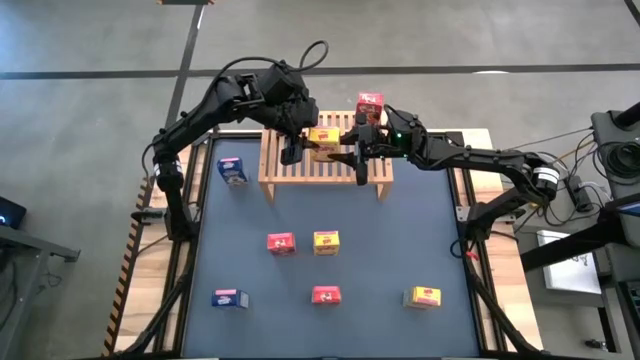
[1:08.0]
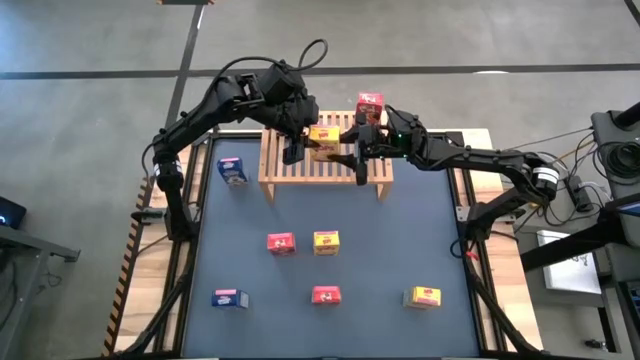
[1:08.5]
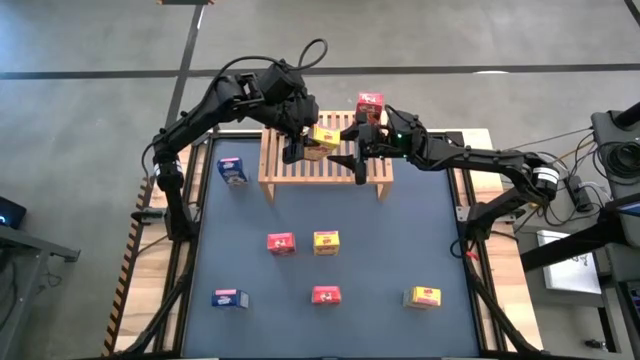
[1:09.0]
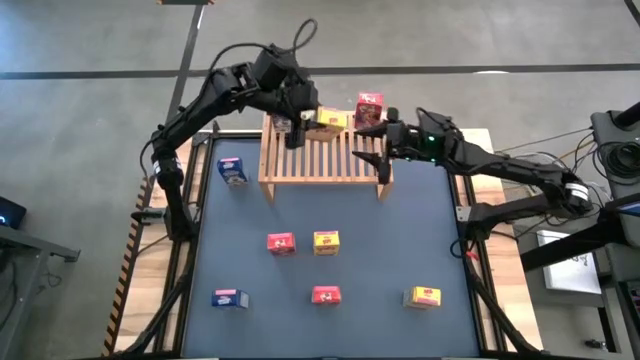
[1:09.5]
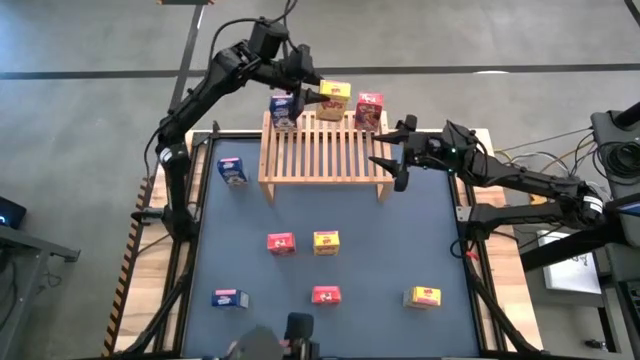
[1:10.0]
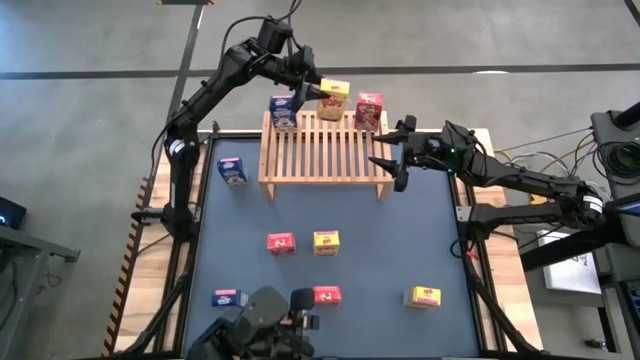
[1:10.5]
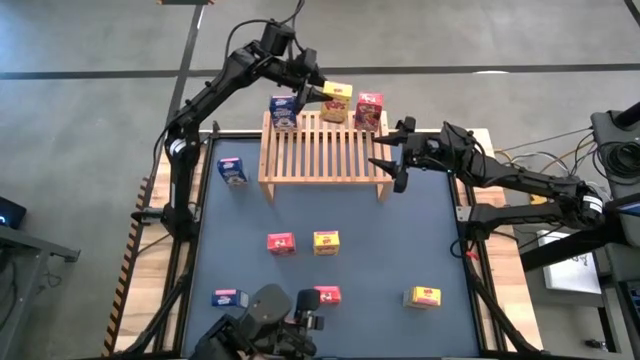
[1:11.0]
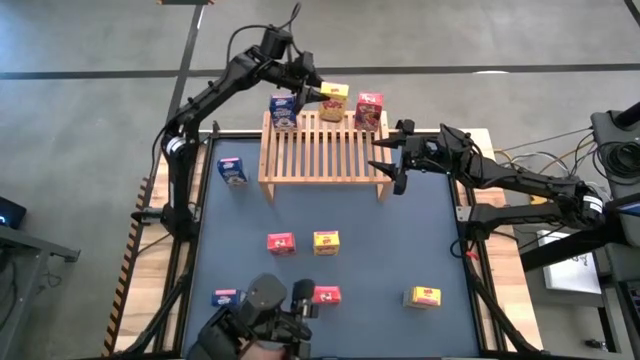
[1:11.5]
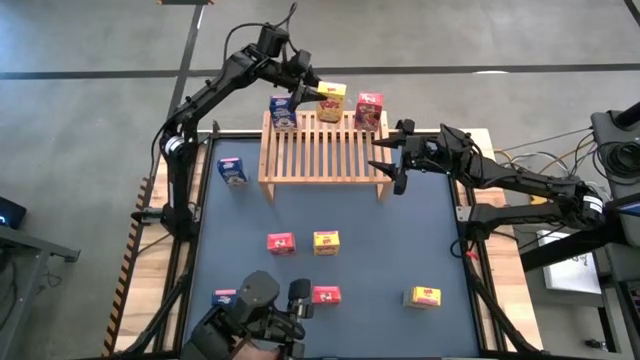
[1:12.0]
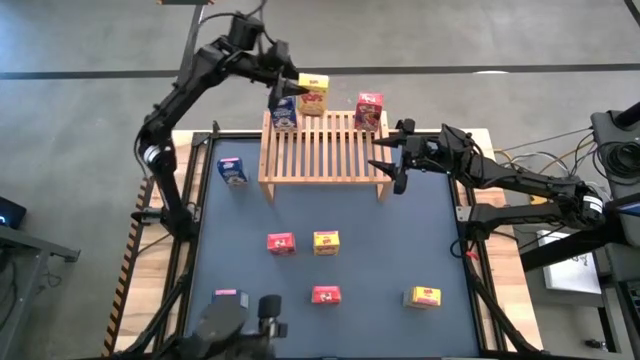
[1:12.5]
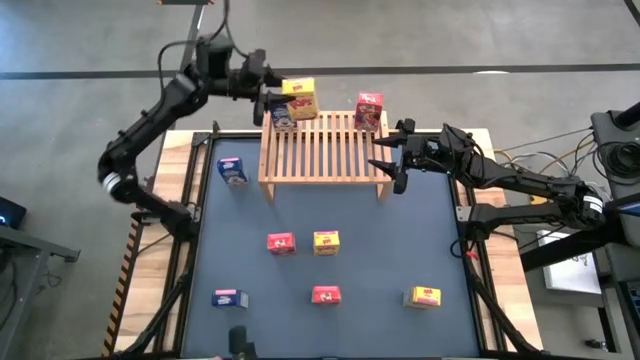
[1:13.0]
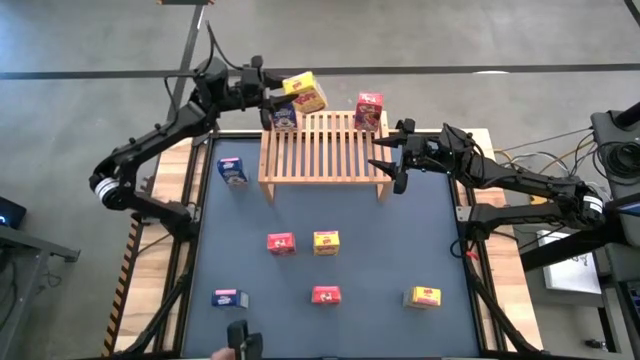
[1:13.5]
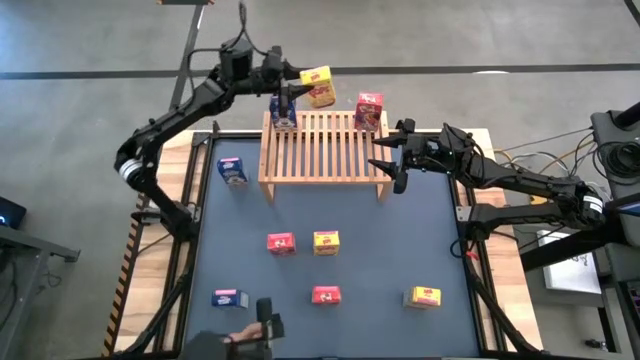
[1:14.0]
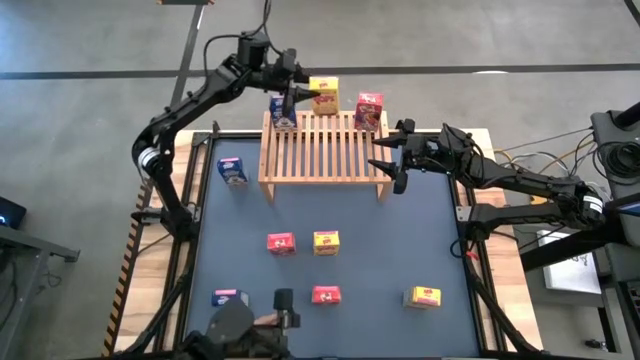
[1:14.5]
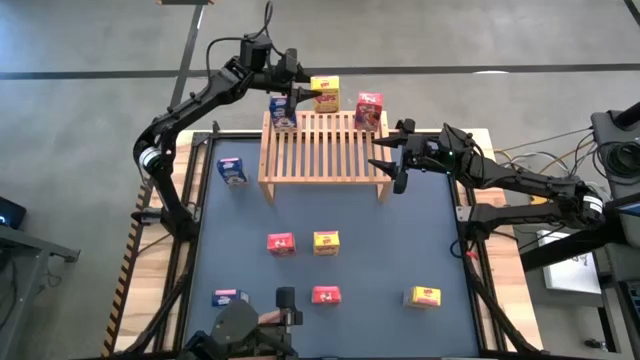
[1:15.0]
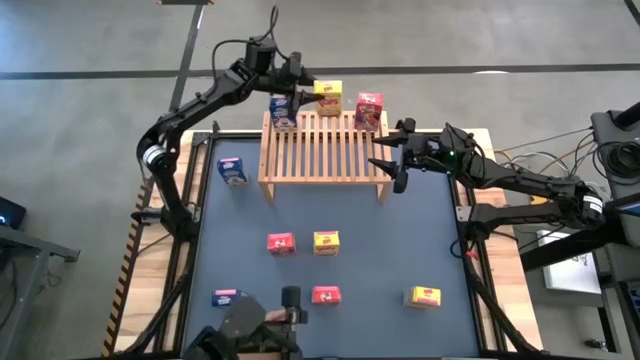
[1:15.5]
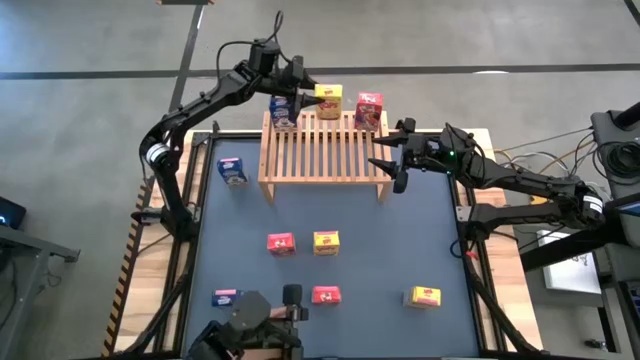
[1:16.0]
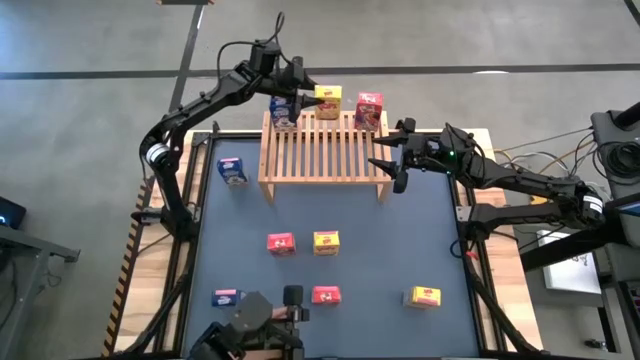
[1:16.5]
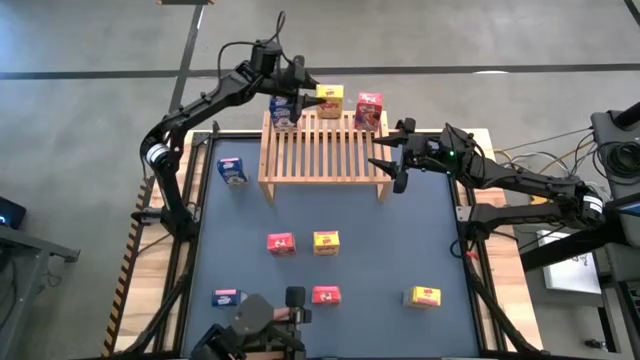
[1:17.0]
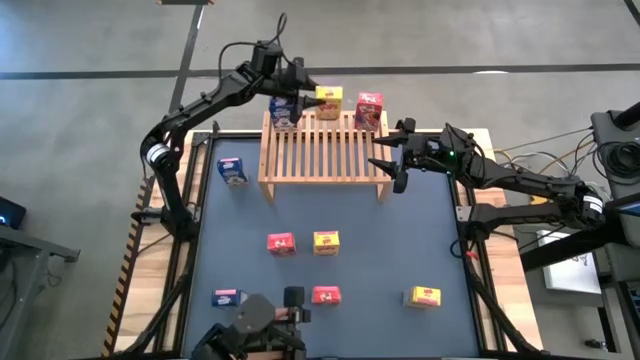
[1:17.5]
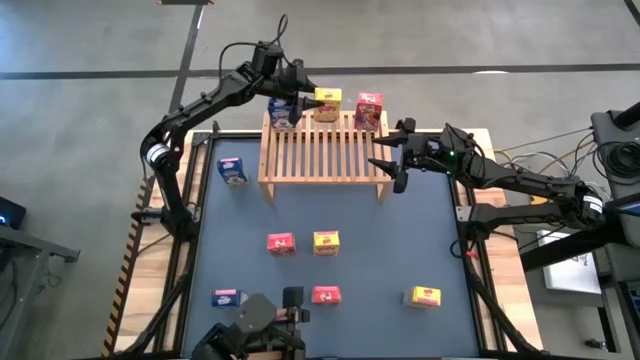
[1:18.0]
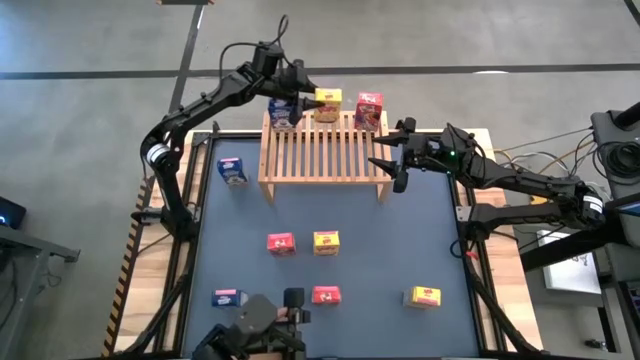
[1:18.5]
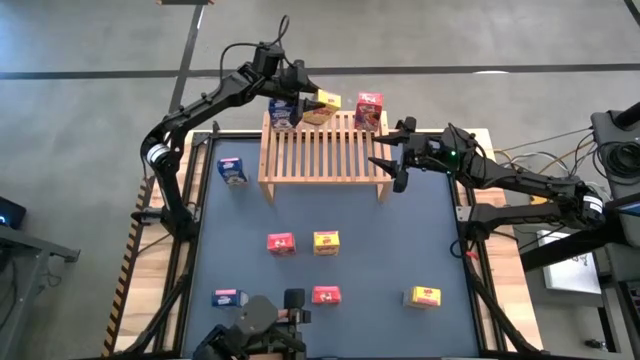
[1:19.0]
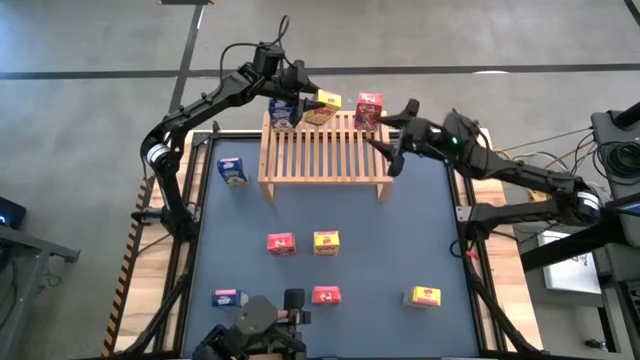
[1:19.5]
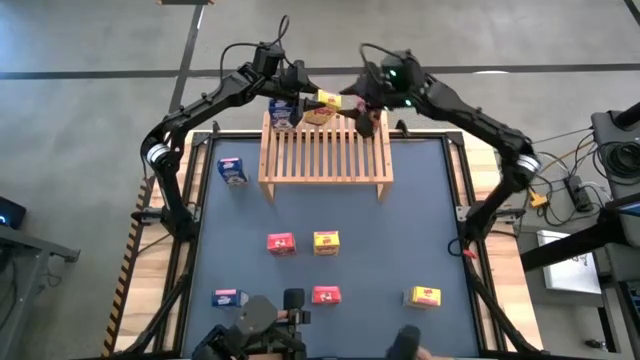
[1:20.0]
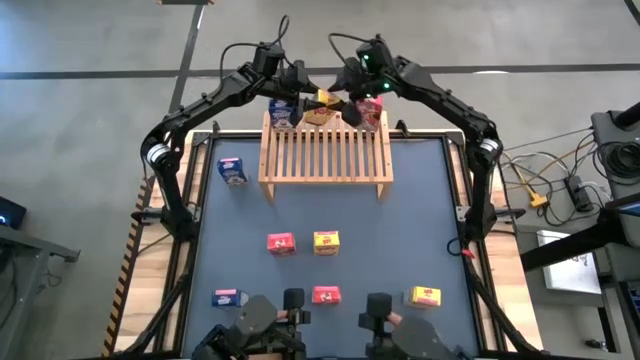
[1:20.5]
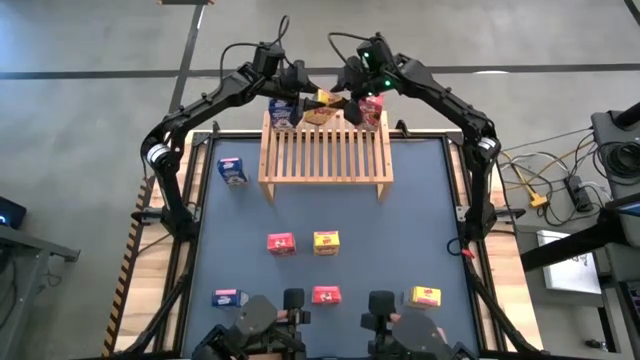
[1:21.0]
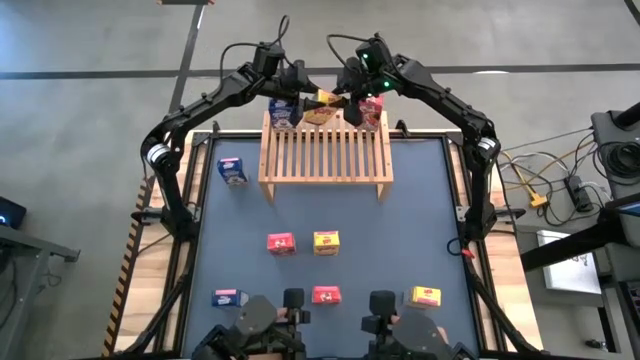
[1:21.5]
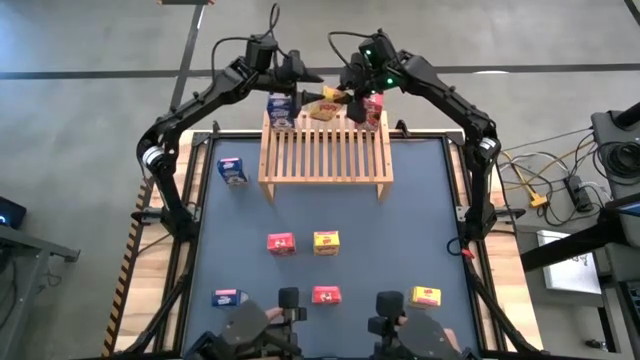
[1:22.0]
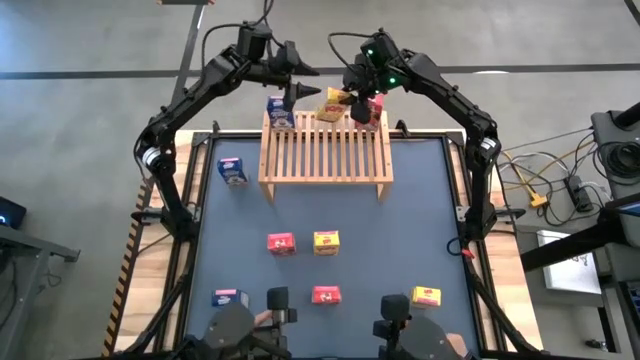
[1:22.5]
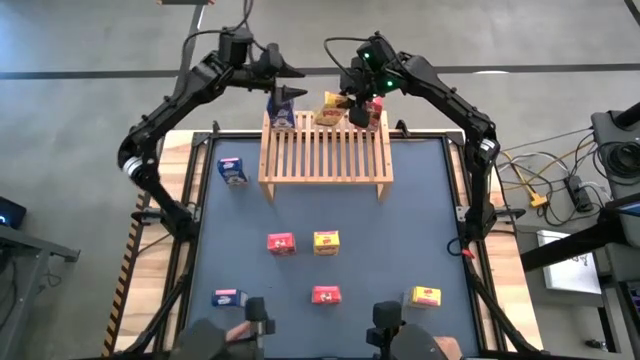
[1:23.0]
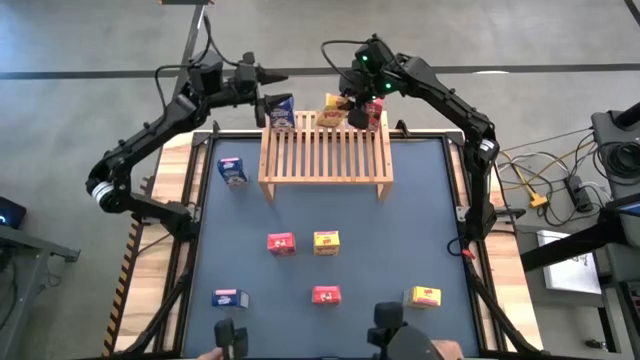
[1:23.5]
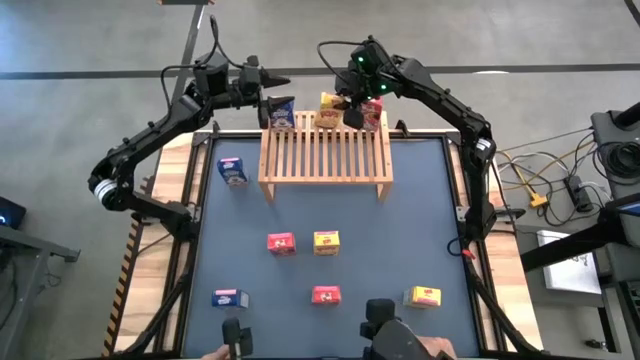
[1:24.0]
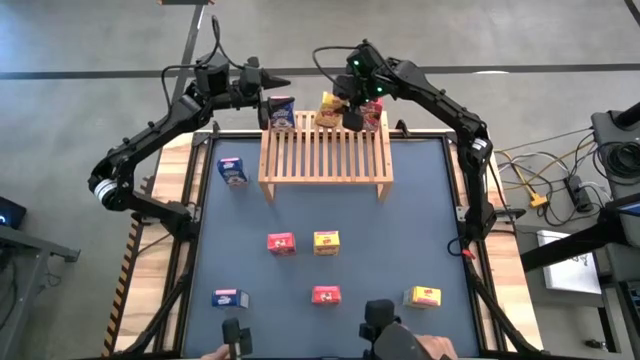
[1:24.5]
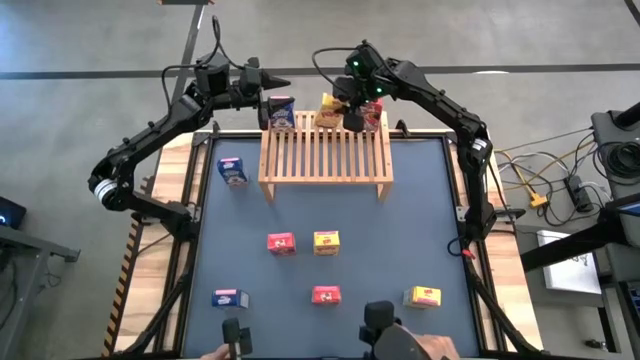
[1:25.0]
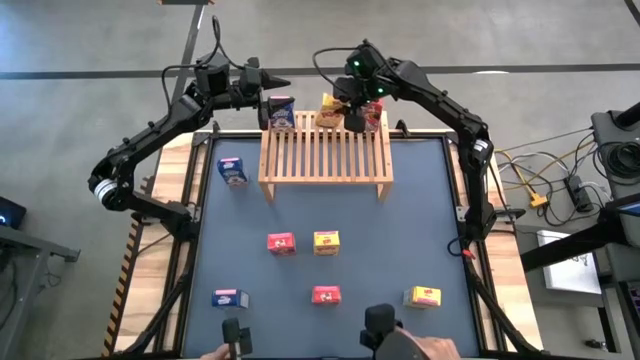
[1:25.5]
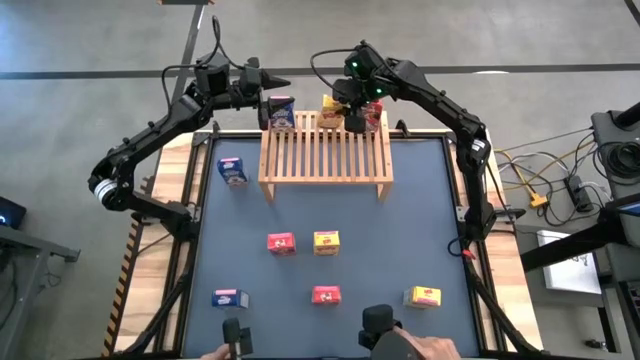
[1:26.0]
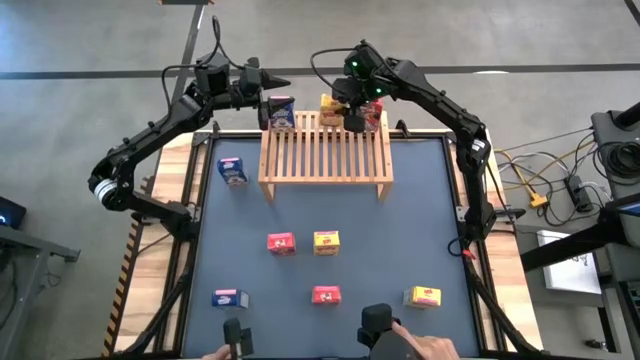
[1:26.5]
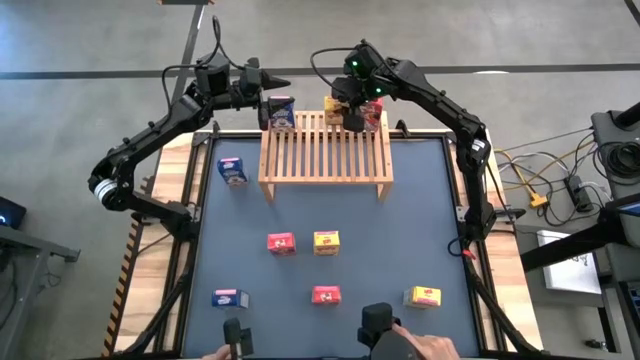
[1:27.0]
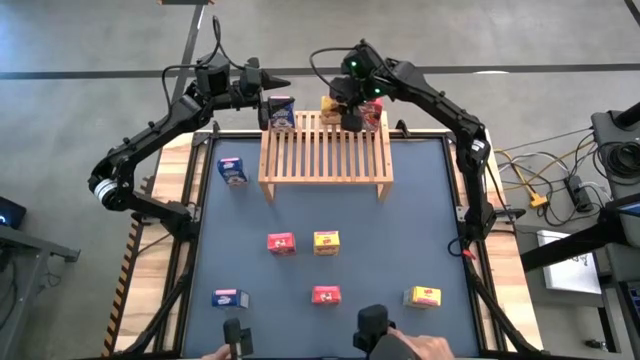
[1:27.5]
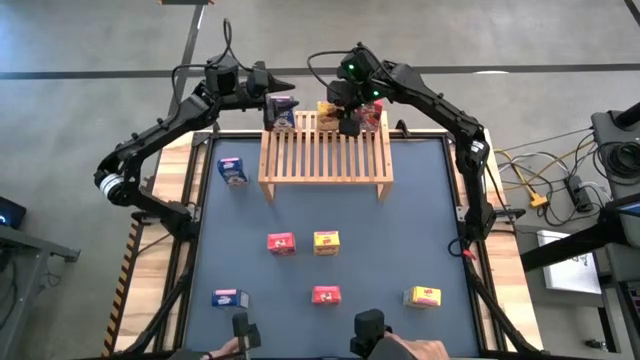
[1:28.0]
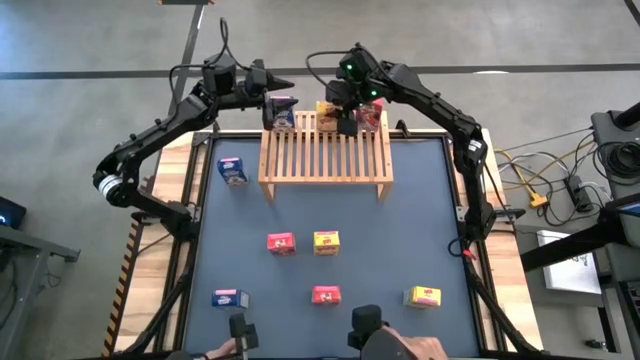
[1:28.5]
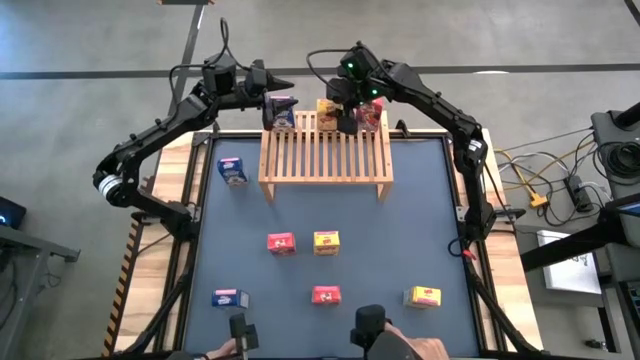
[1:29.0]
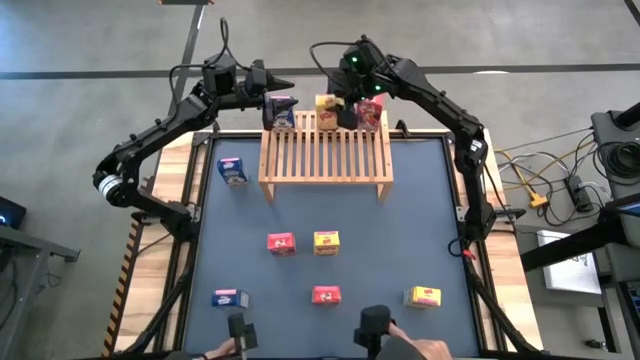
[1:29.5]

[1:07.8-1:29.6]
Task: Stack cereal on shelf
Put the top yellow cereal box on the shelf
